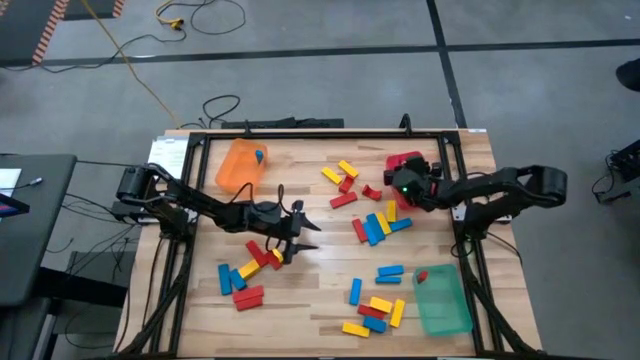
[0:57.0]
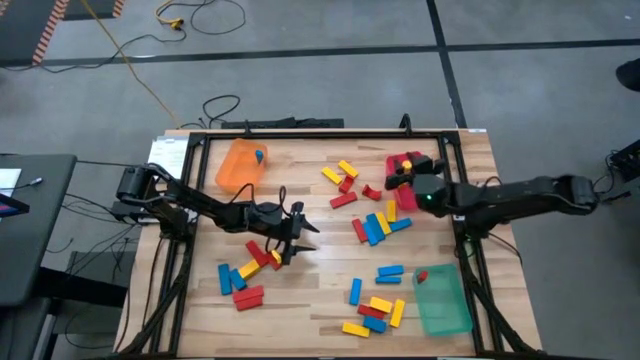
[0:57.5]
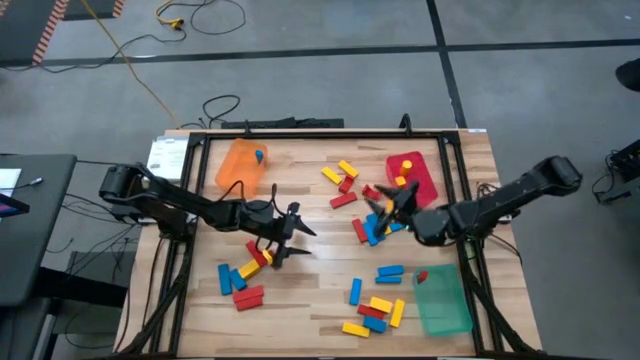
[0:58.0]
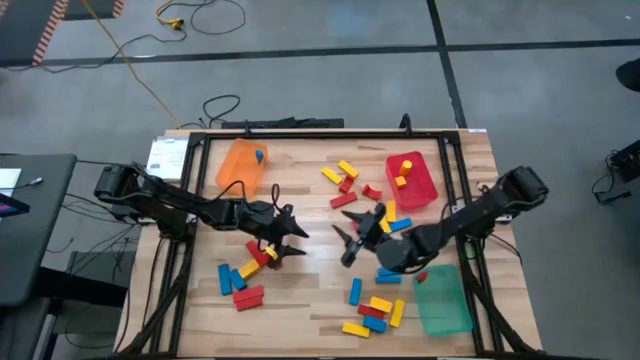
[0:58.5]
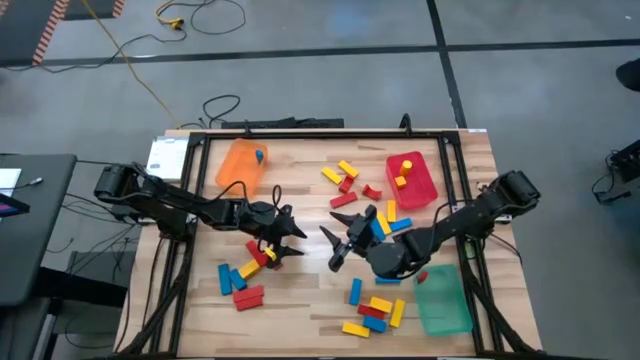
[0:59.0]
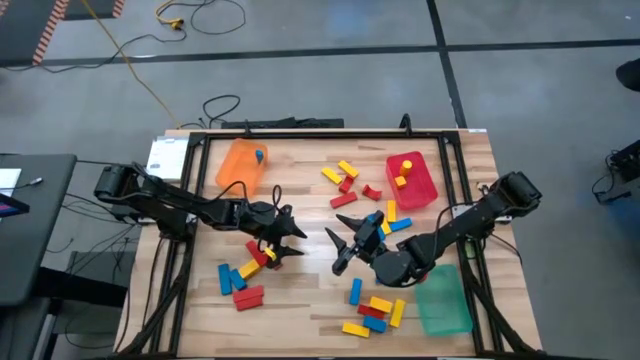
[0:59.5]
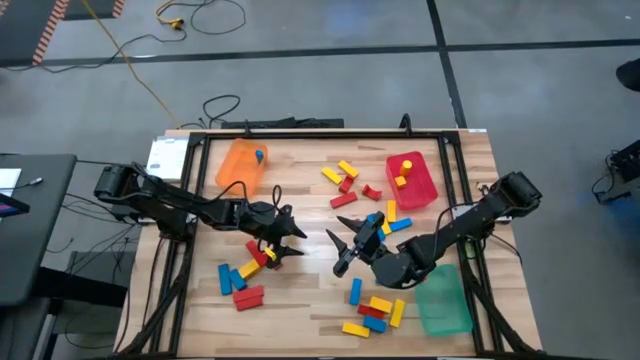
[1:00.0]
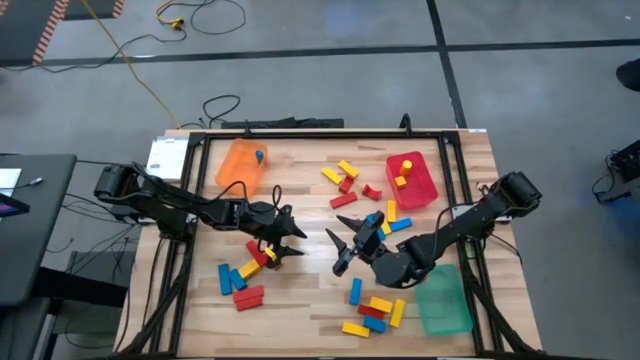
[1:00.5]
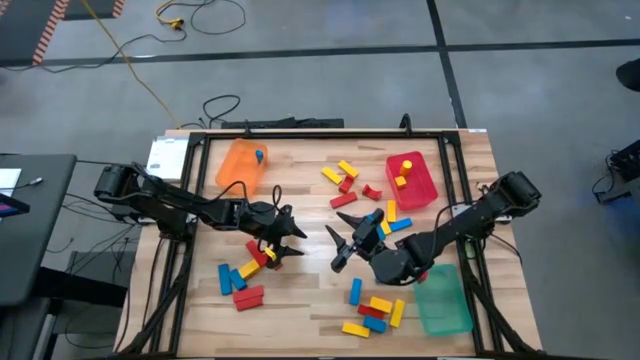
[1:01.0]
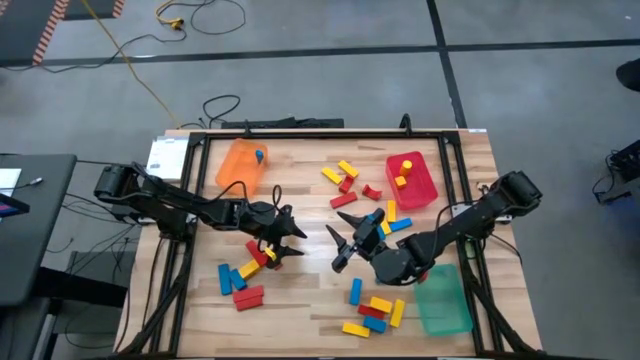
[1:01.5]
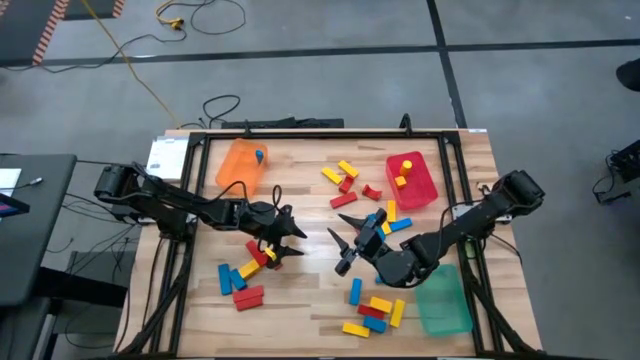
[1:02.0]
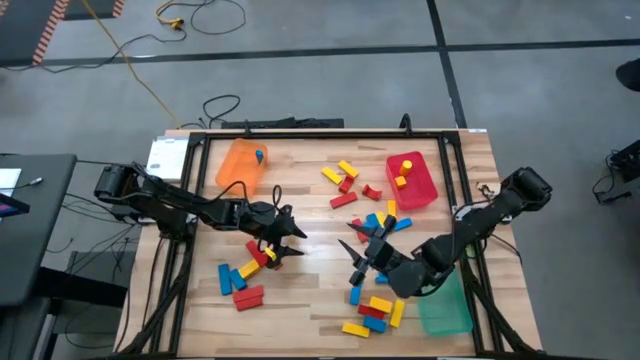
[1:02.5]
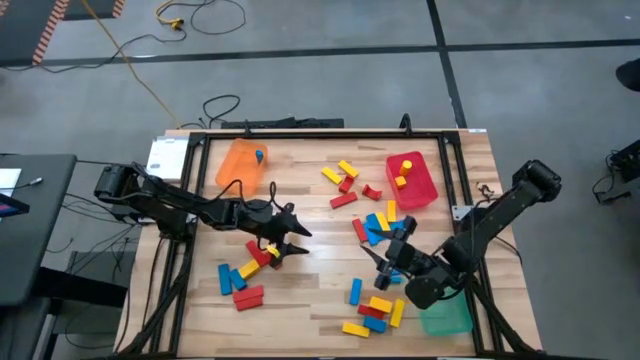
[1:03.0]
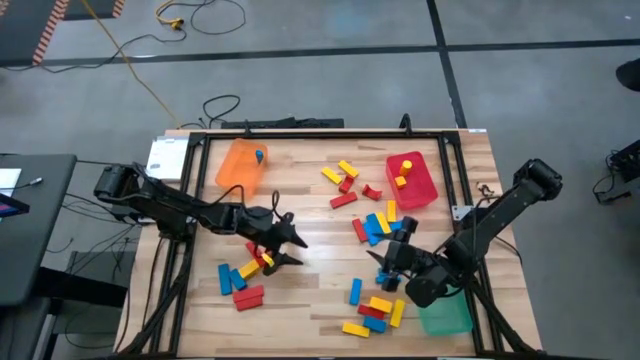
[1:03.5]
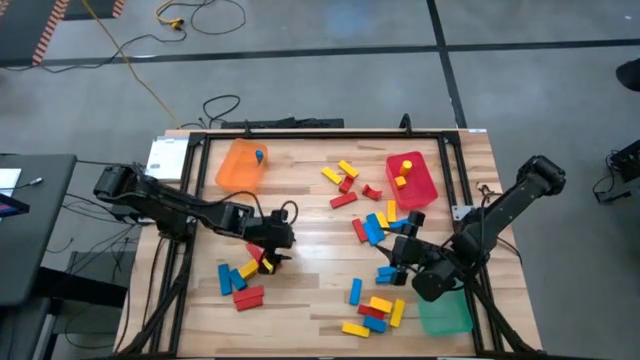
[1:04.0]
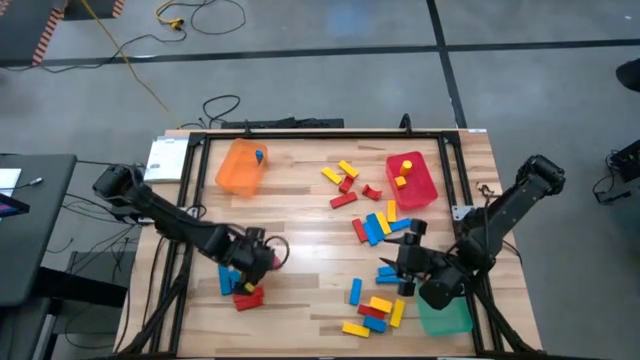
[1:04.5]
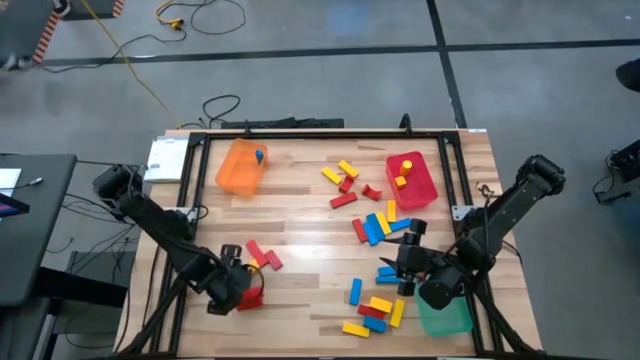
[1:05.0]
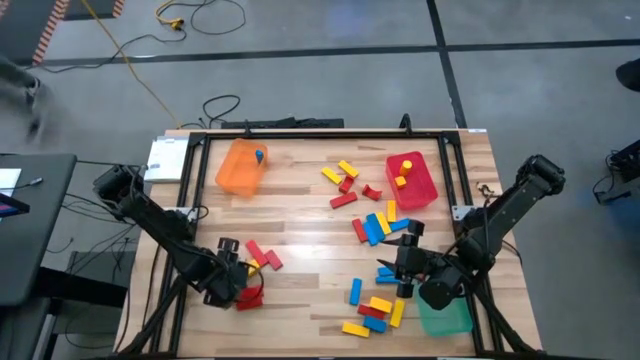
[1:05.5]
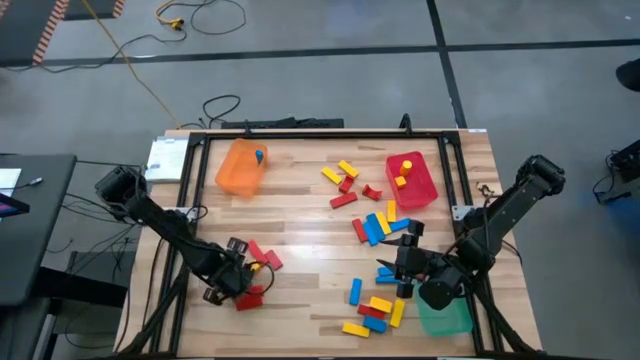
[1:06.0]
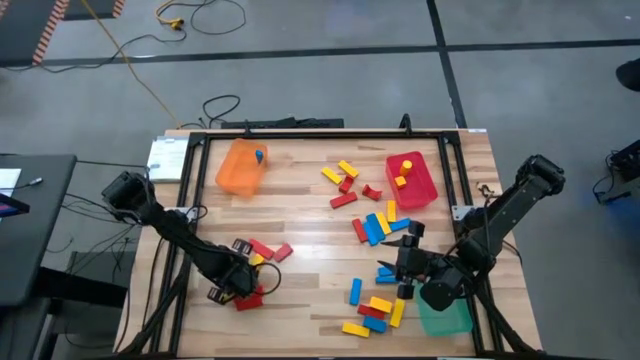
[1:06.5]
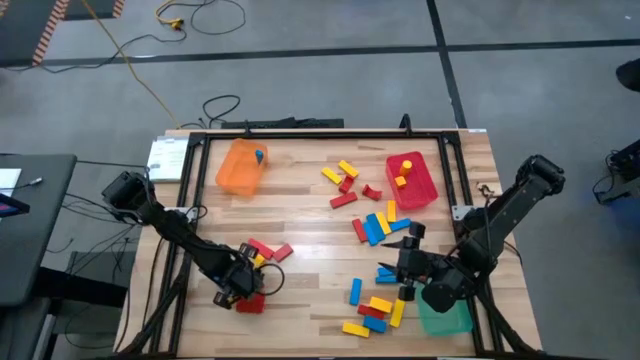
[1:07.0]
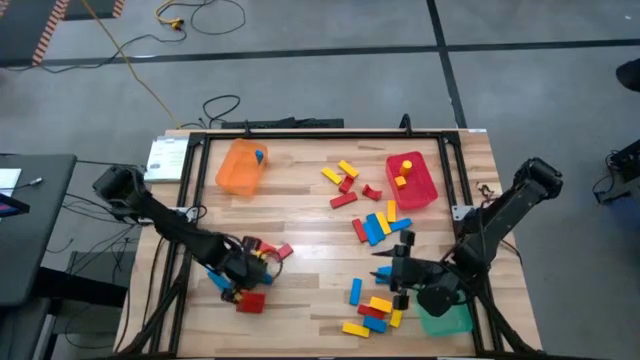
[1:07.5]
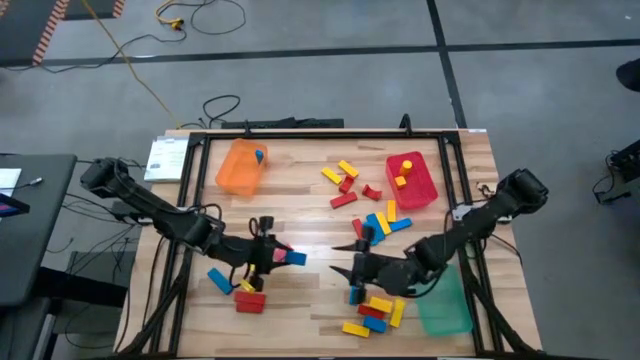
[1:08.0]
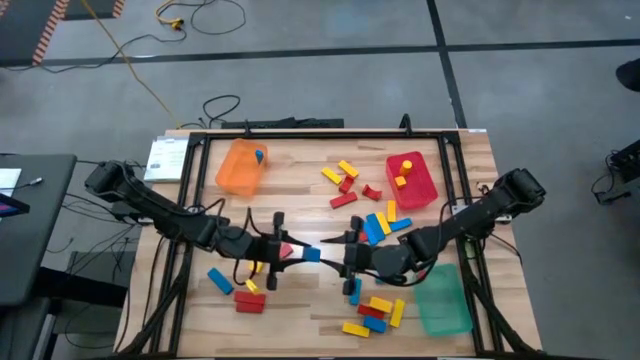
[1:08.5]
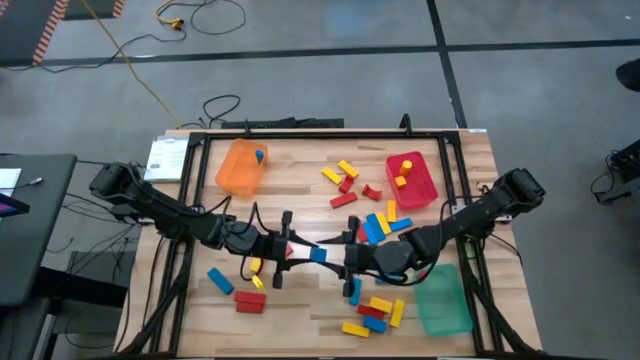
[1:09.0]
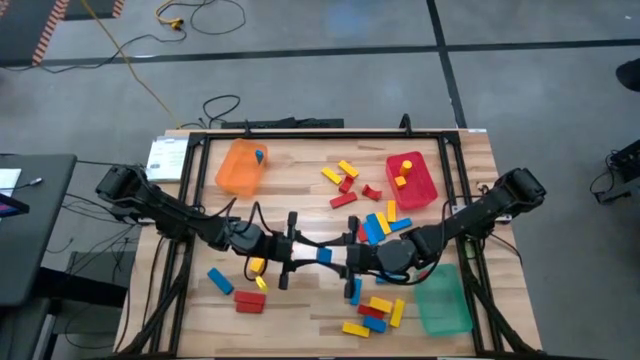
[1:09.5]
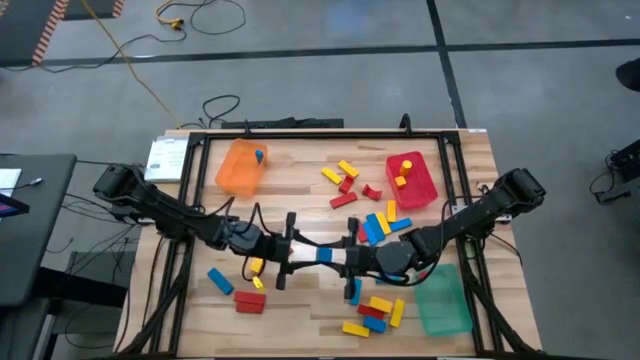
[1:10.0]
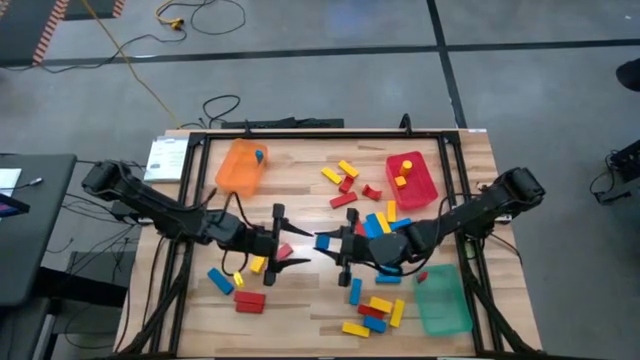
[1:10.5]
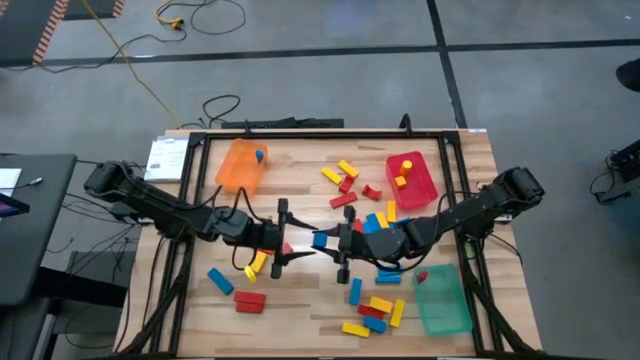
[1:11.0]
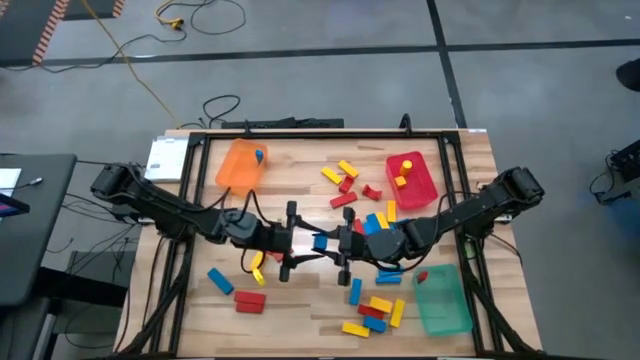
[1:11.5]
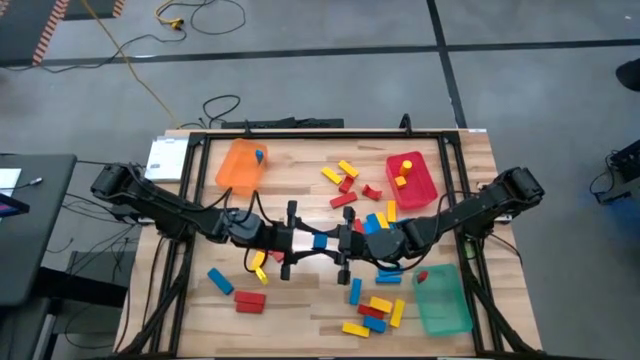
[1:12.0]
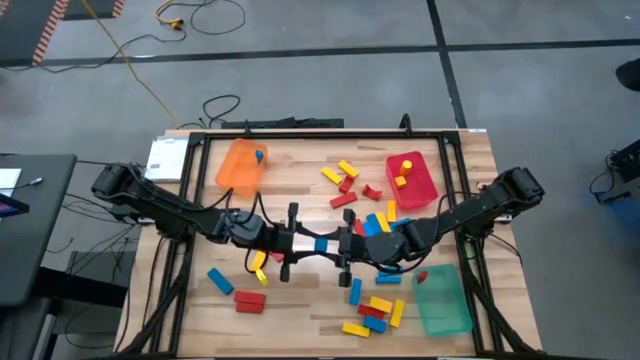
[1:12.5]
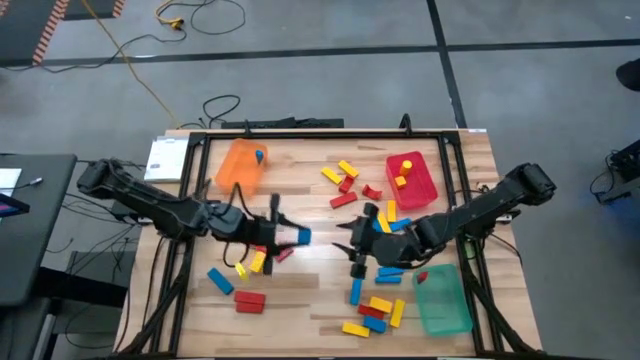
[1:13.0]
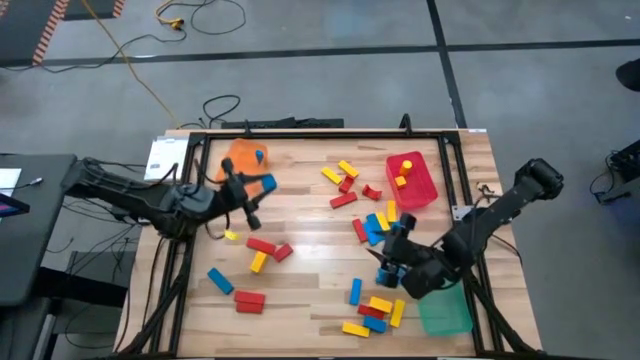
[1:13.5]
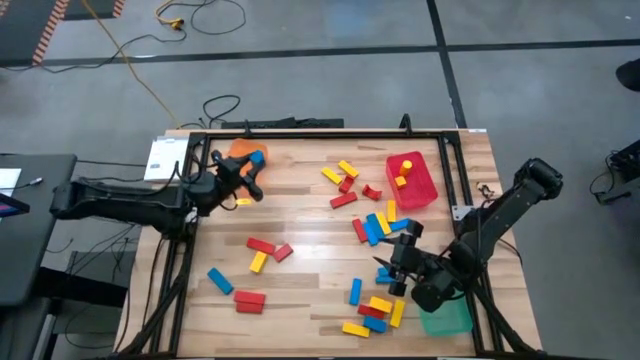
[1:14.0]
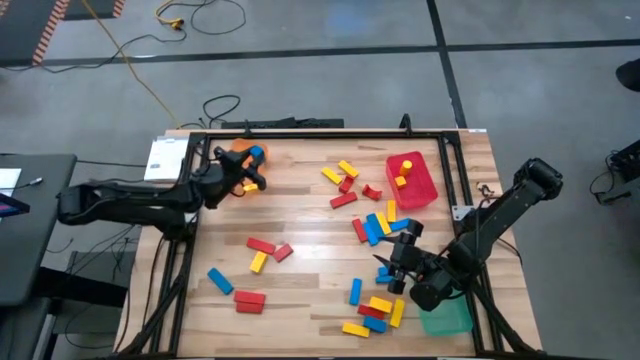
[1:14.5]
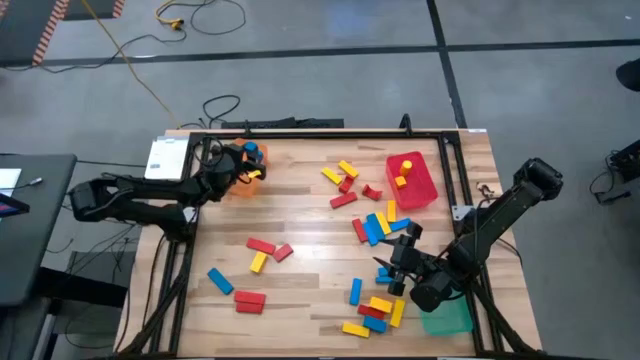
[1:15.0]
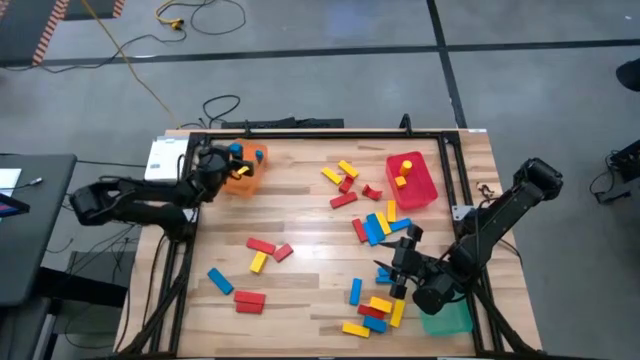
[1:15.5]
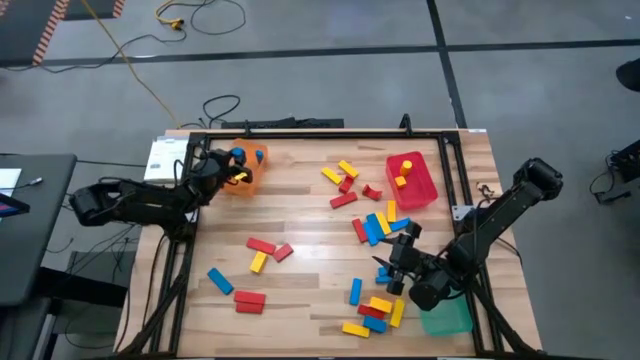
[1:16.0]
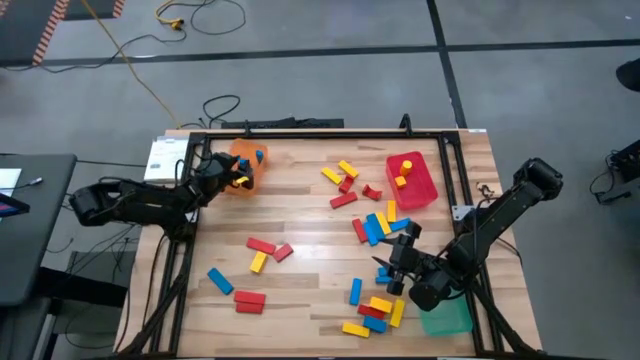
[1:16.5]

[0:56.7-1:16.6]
Task: Sort blocks
Put the blue rectangle block into the orange bin
